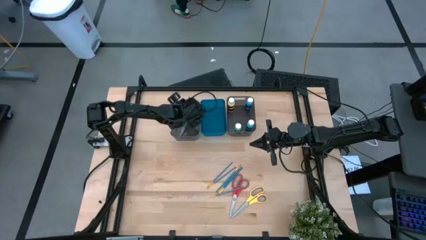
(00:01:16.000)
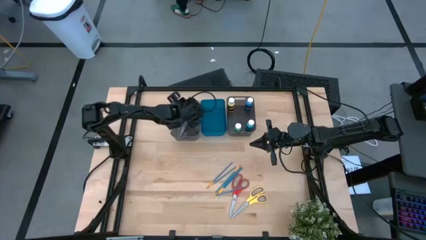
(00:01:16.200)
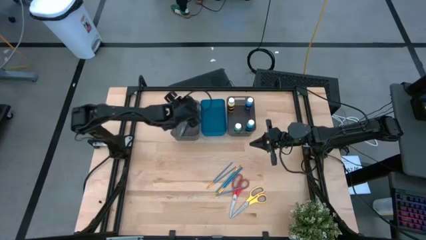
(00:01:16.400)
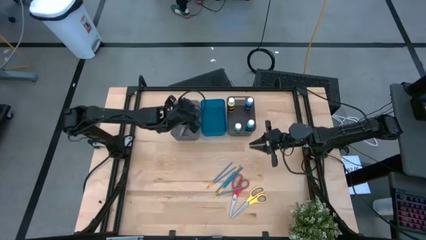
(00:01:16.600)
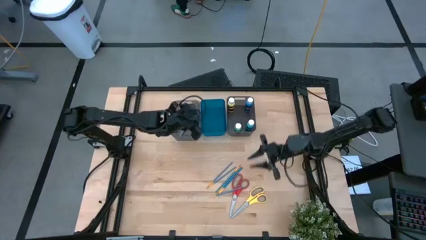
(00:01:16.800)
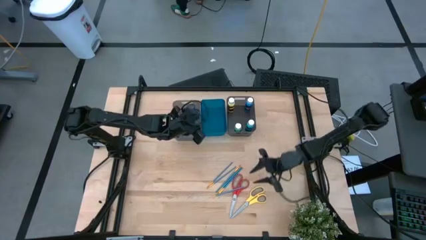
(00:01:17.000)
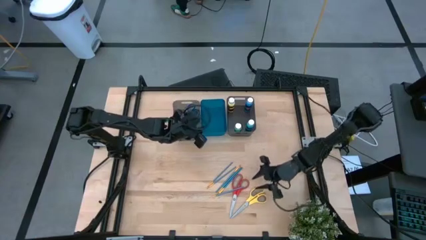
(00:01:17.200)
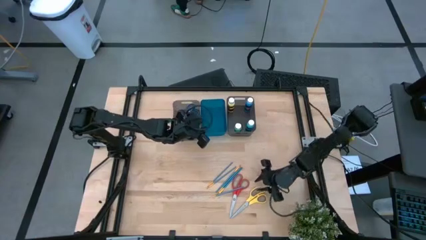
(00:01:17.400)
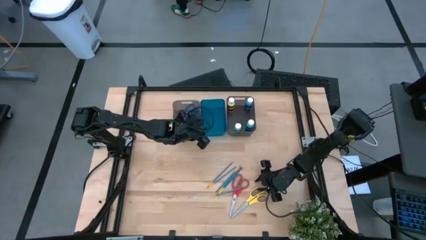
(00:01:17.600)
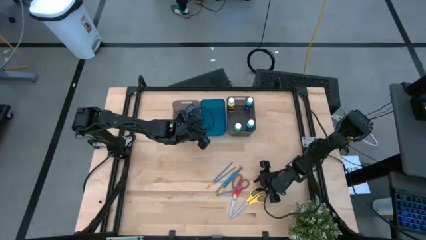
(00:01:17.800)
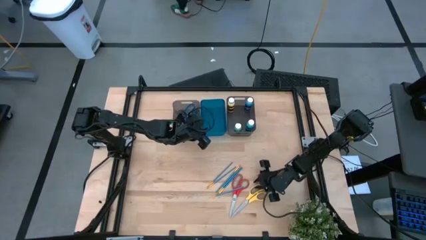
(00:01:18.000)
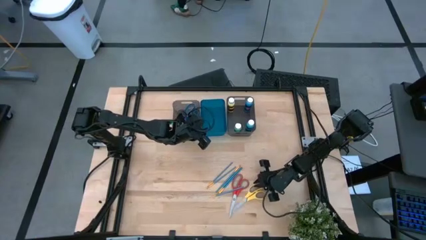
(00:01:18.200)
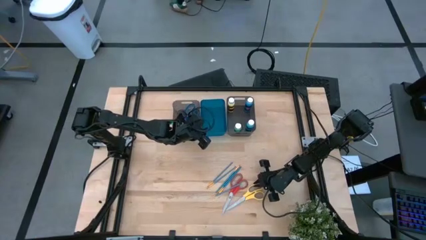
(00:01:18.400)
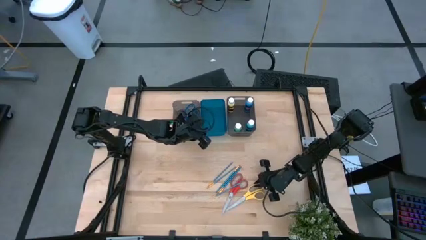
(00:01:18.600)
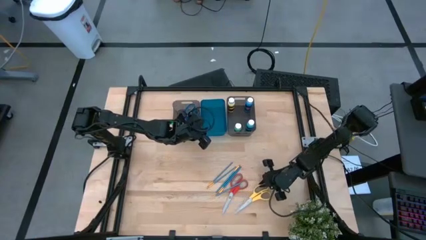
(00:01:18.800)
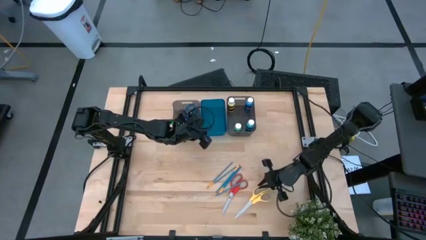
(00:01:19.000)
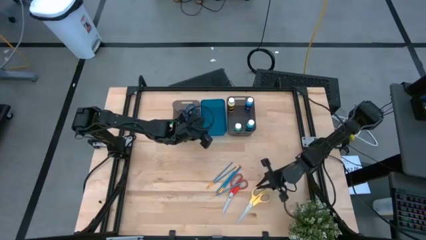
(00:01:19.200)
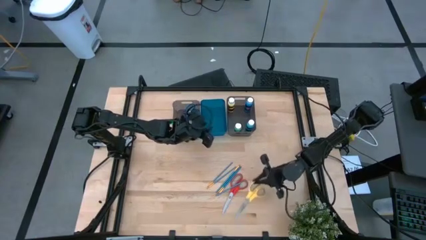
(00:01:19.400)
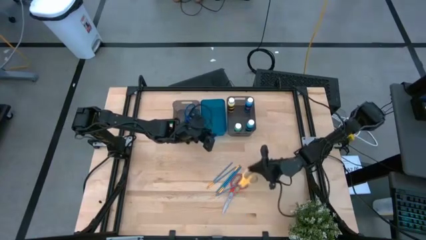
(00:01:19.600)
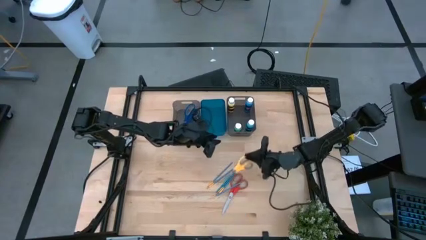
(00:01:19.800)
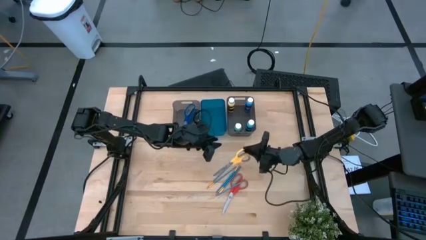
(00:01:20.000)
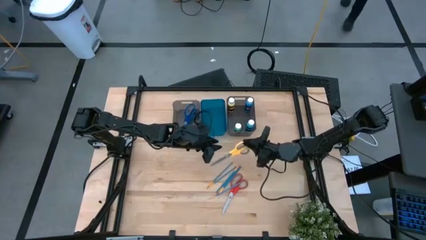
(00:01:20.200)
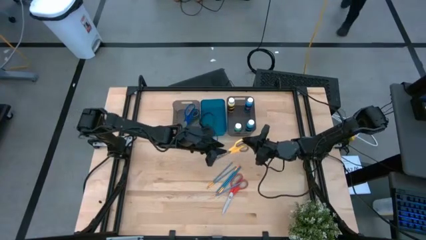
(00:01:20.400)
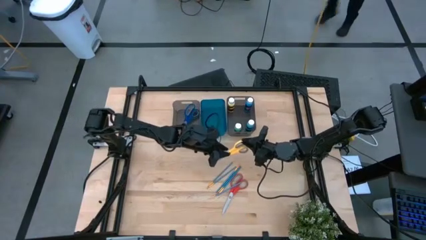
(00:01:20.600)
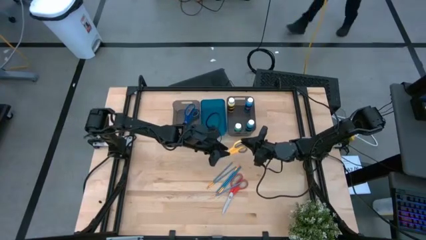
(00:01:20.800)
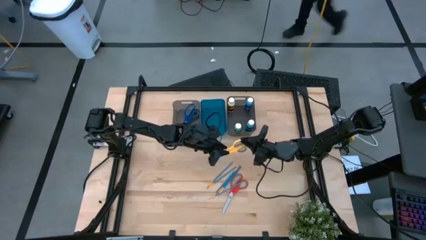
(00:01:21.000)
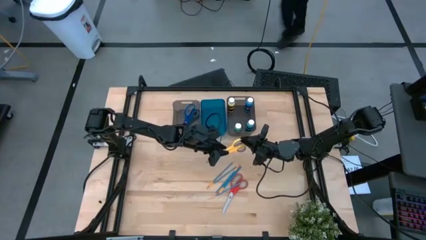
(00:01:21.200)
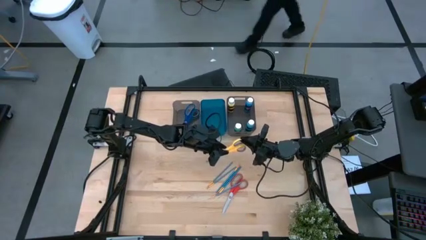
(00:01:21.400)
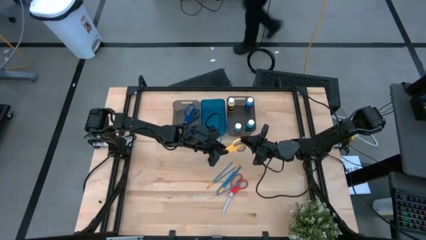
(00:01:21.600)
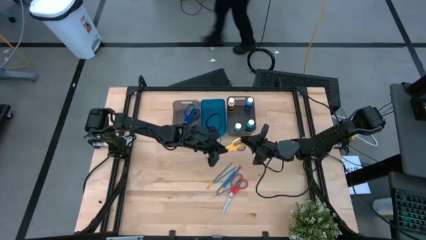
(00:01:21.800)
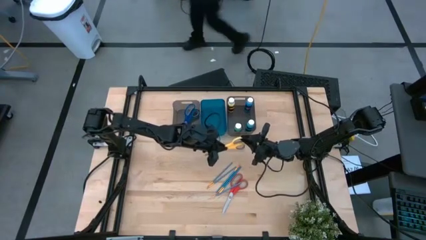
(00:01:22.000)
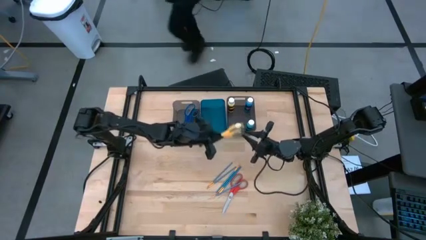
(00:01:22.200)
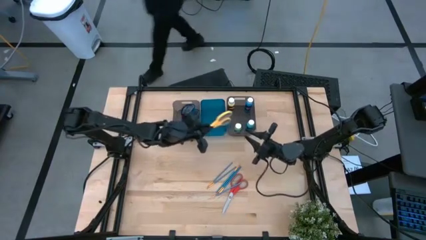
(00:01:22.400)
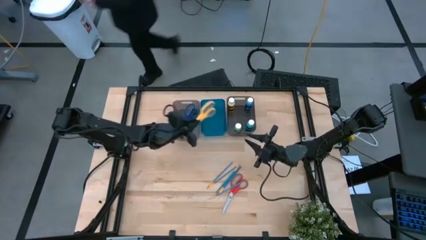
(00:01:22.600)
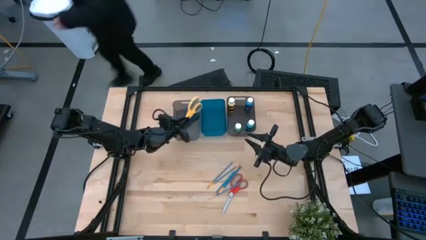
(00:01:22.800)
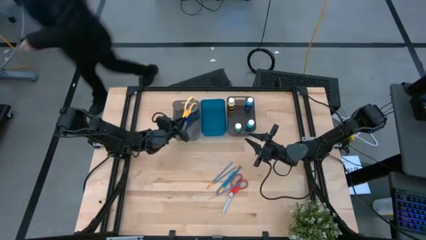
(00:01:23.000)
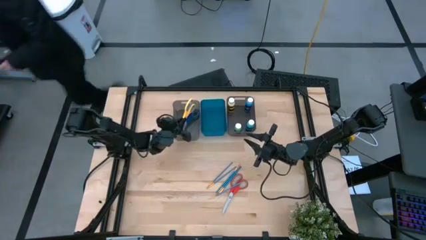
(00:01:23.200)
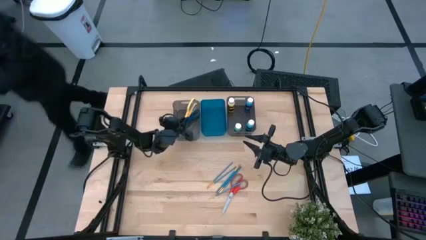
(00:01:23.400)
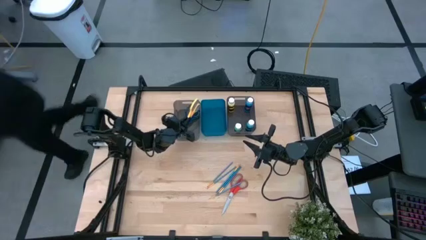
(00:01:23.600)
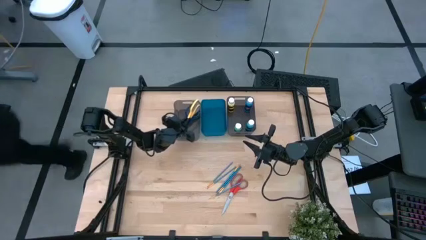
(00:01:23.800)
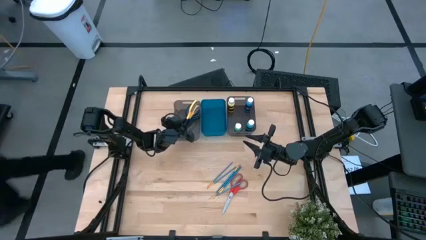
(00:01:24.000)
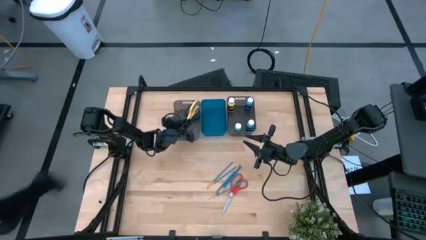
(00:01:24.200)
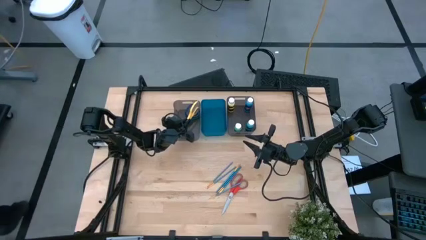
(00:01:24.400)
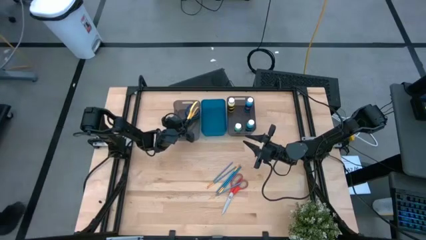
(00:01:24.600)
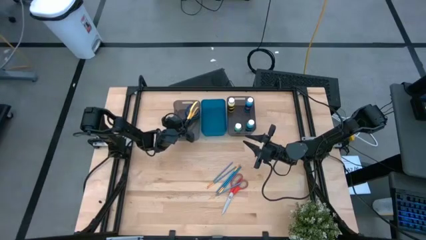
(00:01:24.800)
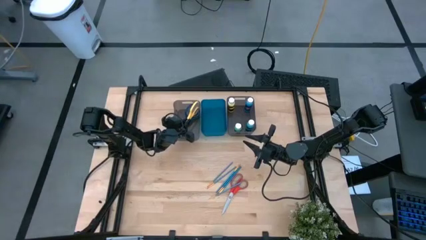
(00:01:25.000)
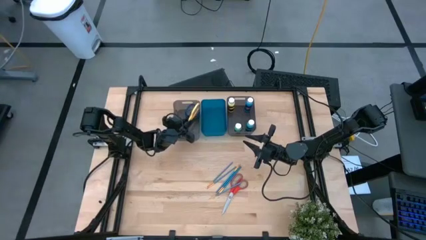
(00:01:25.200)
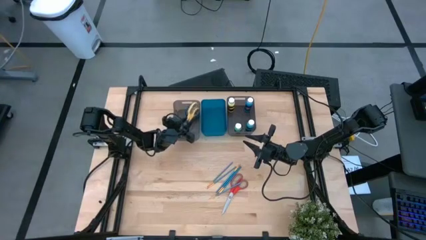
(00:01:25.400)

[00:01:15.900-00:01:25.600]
Task: Pick & Place Paint Supplies
Put the yellow scissors into the left gray bin

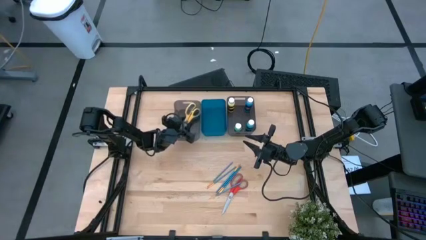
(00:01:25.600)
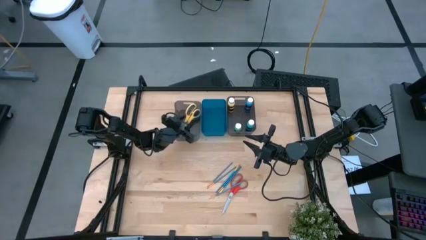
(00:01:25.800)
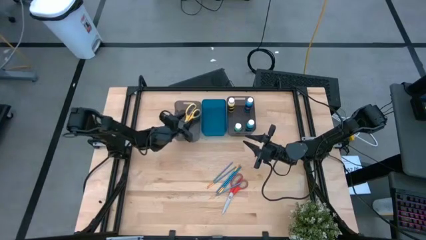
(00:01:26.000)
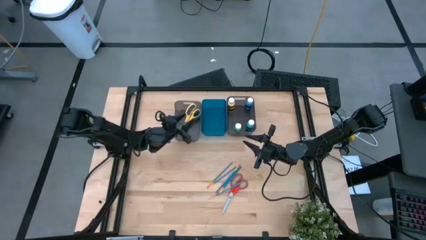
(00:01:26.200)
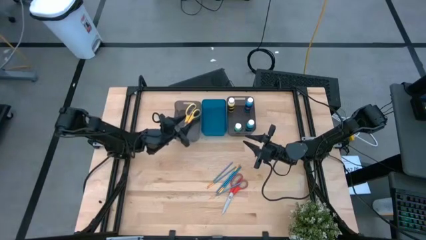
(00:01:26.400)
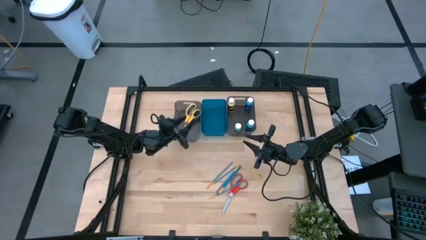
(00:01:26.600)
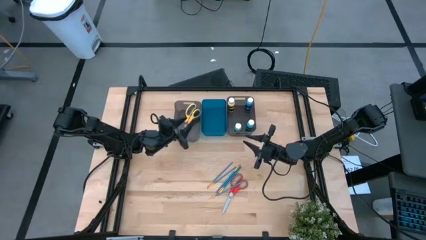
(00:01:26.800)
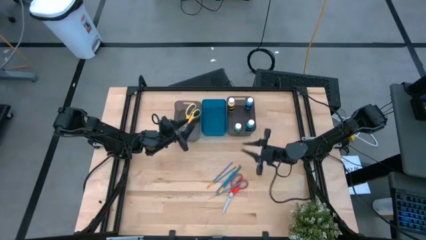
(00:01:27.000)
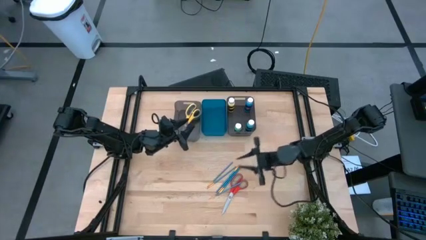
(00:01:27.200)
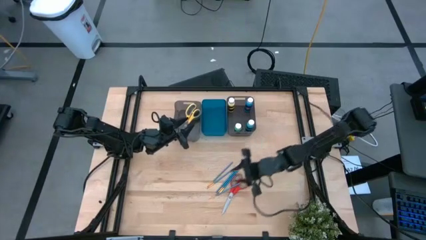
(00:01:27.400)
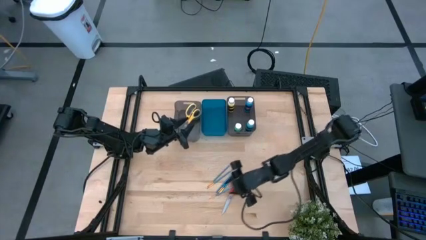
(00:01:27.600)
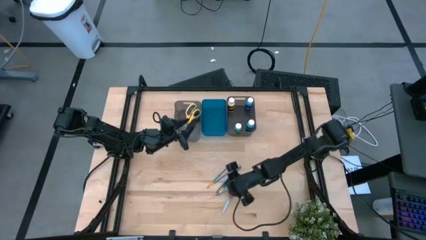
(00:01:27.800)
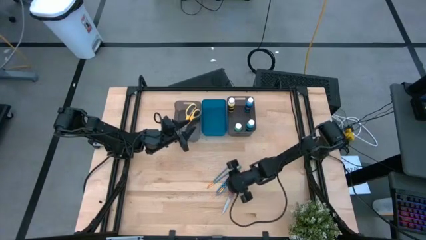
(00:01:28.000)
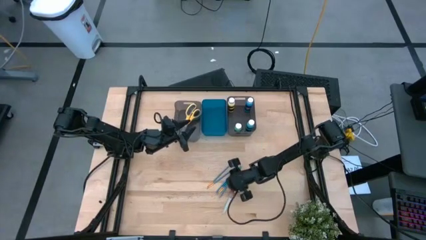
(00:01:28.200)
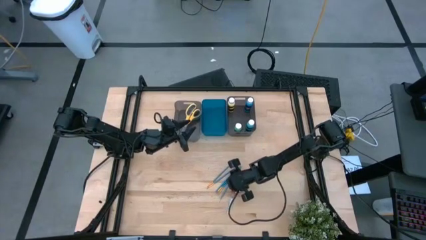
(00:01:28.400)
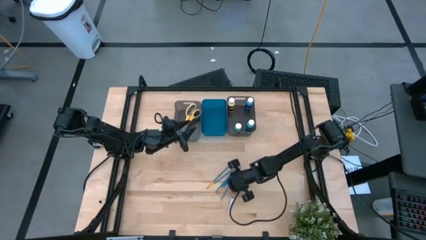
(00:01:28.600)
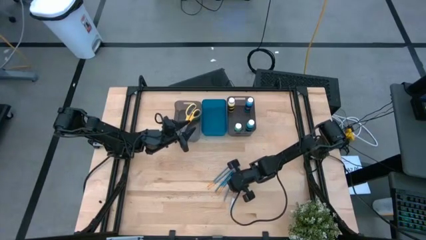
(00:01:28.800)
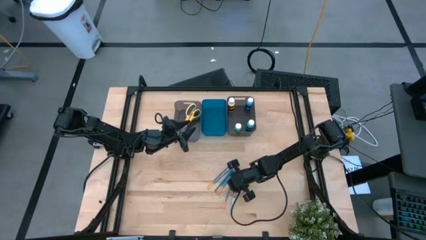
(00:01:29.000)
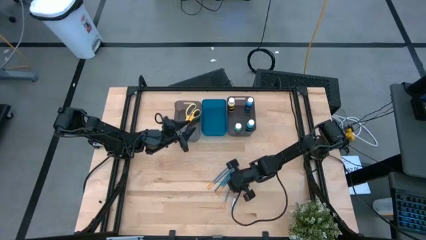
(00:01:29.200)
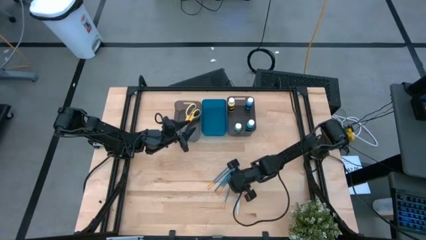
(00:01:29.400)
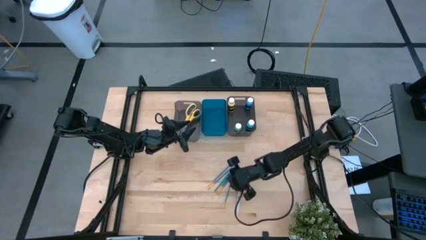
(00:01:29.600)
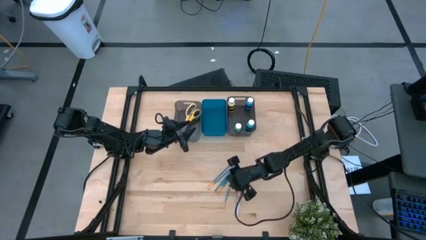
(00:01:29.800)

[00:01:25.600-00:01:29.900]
Put the blue paint brush into the blue bin

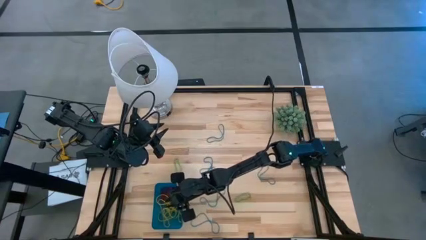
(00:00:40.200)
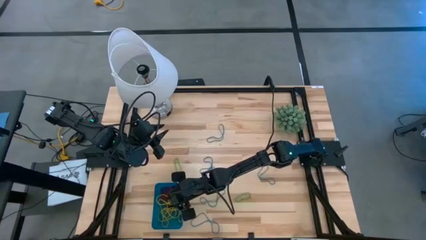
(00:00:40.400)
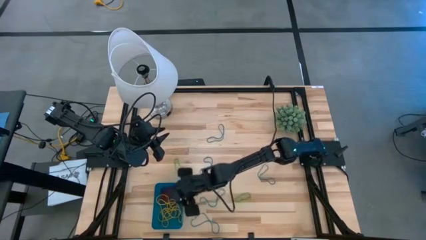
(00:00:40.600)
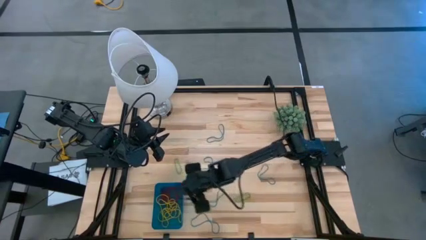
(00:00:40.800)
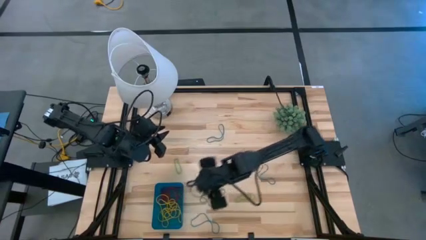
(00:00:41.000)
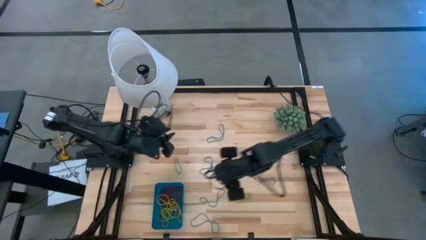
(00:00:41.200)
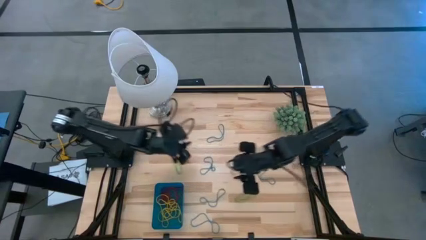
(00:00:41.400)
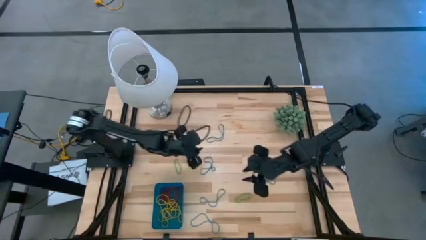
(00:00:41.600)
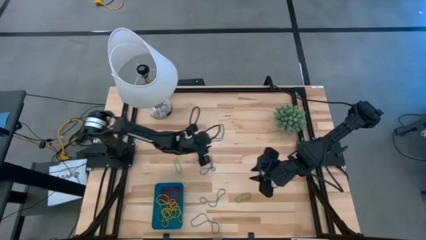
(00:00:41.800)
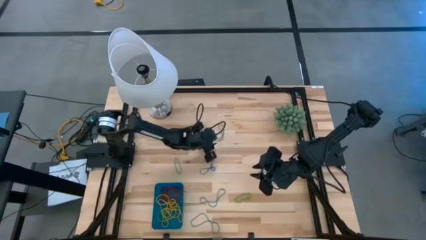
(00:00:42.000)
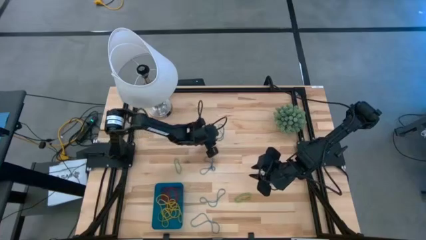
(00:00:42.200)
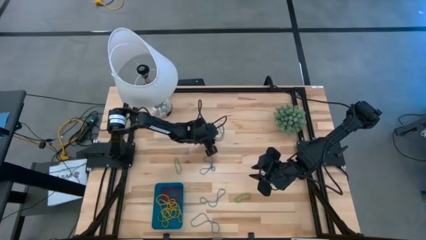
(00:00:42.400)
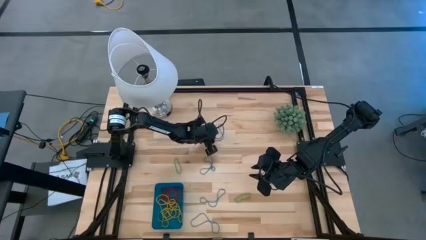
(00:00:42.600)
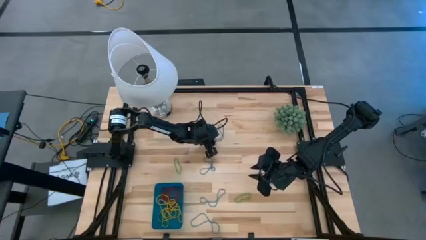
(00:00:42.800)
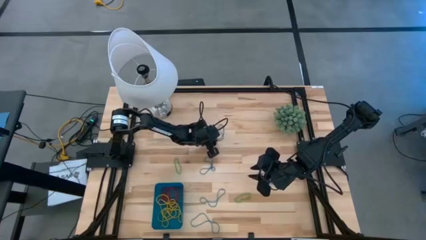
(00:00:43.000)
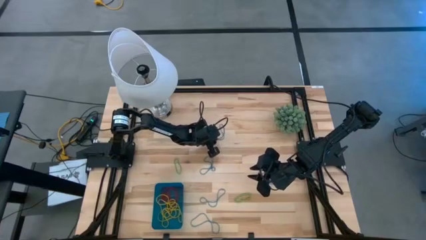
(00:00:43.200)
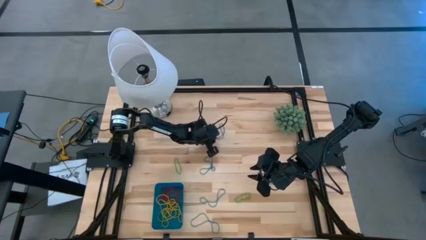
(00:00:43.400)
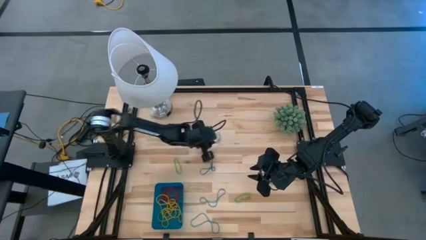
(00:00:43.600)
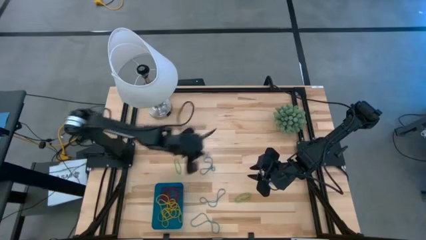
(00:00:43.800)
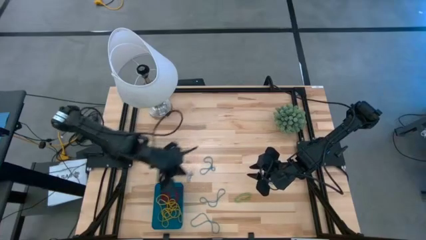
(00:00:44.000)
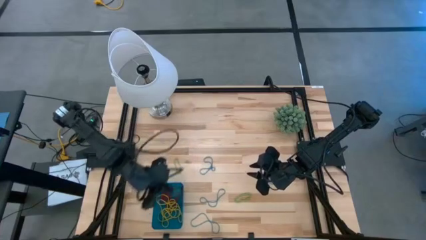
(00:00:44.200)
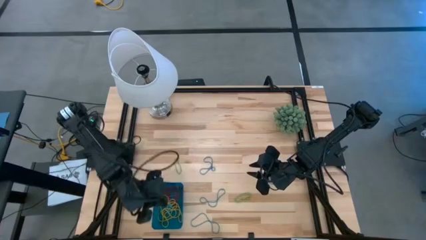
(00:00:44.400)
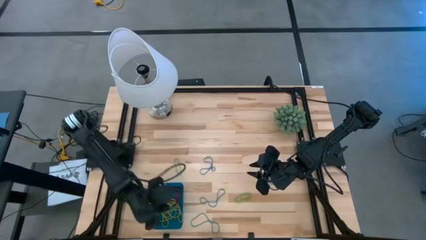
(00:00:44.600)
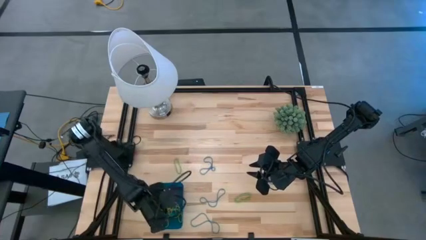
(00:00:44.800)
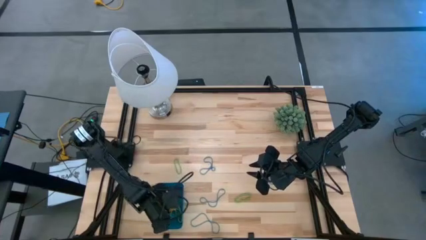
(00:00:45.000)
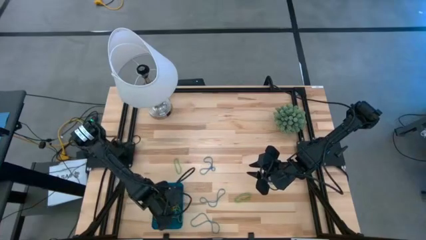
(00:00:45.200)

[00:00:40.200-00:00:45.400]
Task: Pick and place items into bin
Put the blue rubber band into the blue bin
